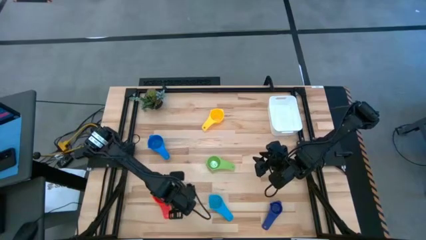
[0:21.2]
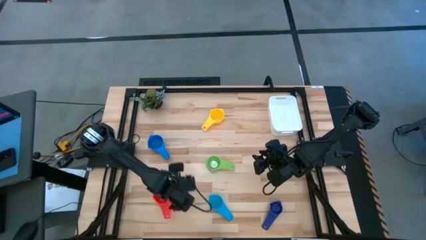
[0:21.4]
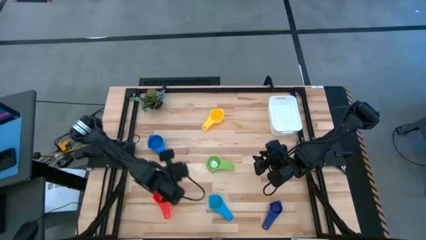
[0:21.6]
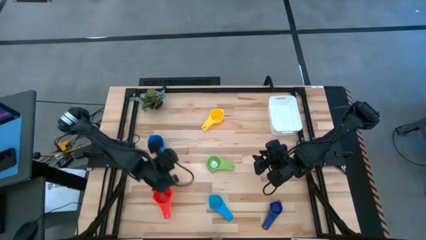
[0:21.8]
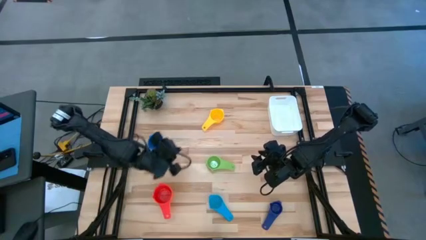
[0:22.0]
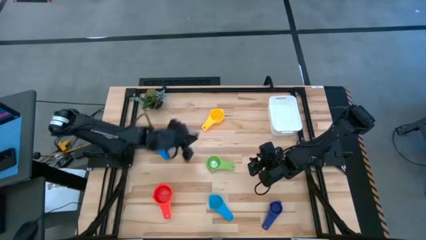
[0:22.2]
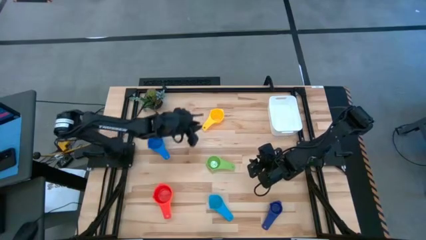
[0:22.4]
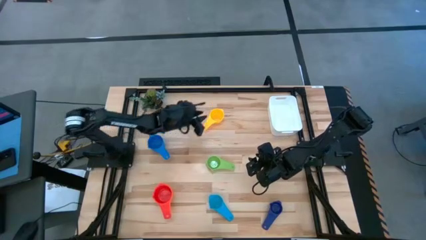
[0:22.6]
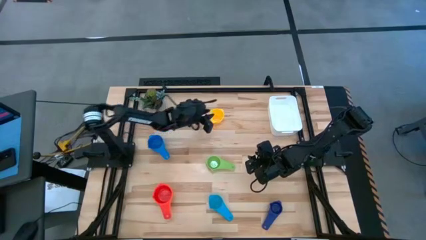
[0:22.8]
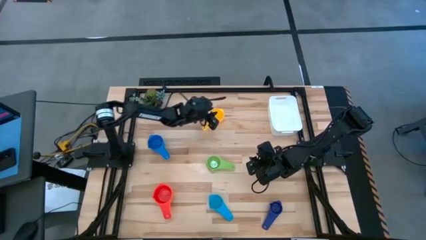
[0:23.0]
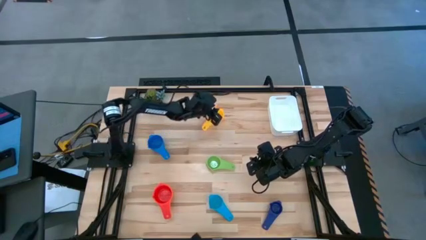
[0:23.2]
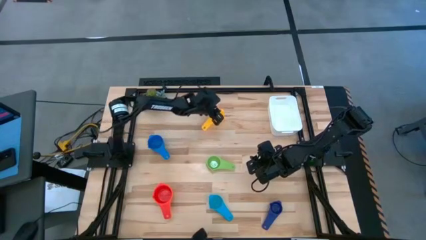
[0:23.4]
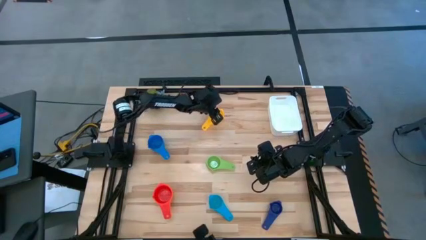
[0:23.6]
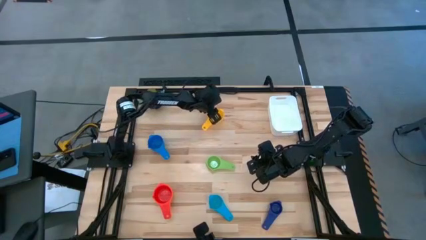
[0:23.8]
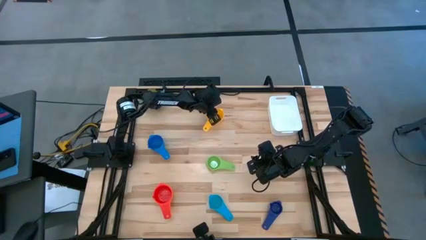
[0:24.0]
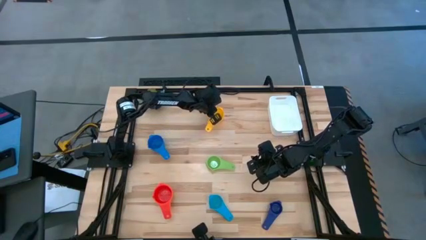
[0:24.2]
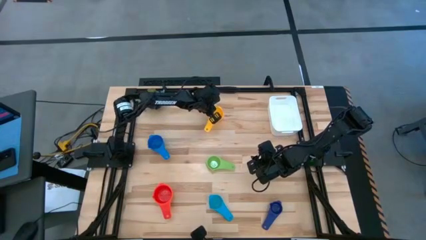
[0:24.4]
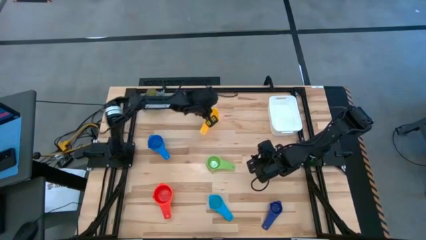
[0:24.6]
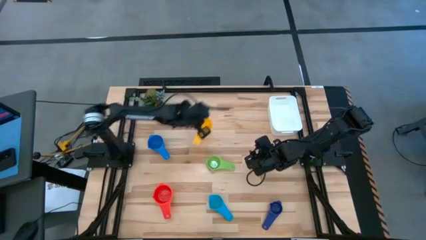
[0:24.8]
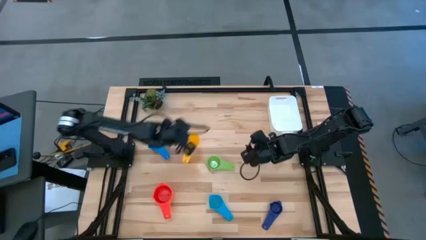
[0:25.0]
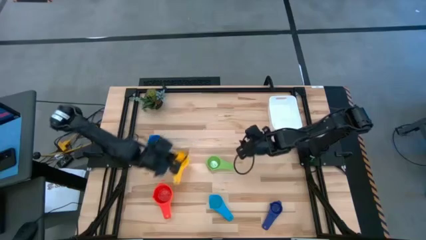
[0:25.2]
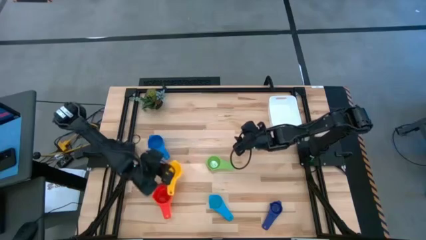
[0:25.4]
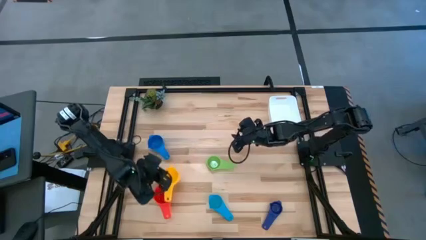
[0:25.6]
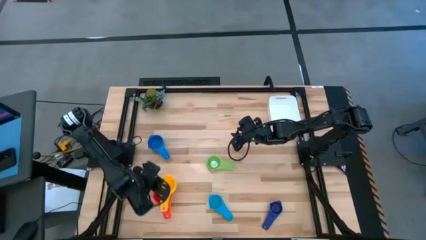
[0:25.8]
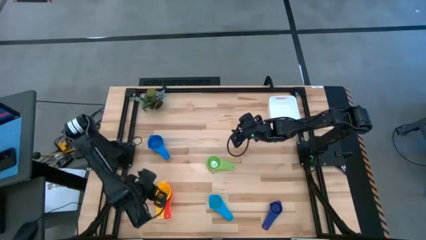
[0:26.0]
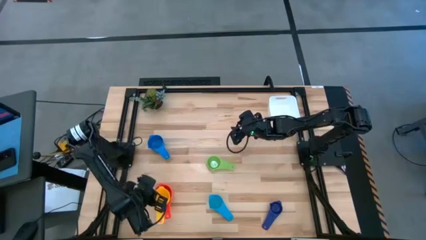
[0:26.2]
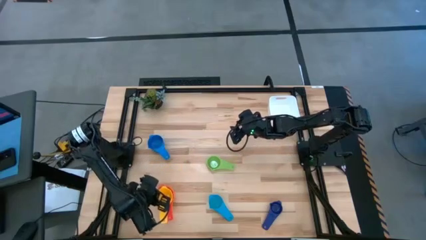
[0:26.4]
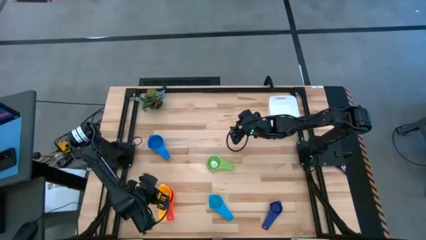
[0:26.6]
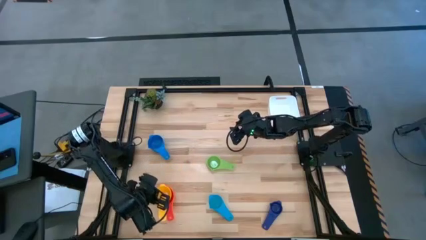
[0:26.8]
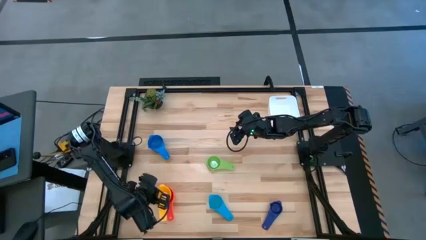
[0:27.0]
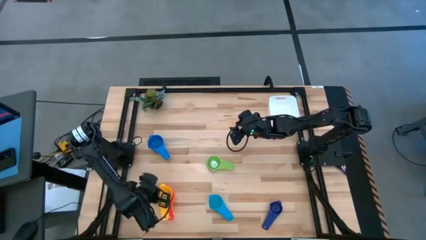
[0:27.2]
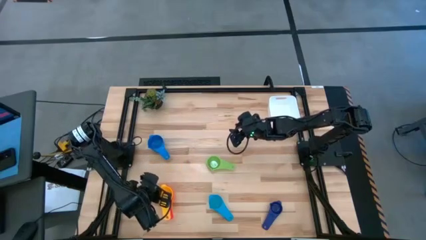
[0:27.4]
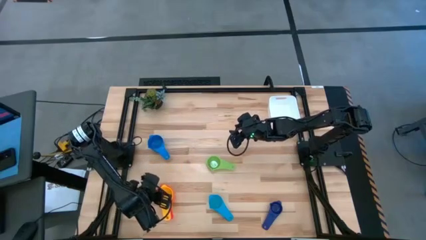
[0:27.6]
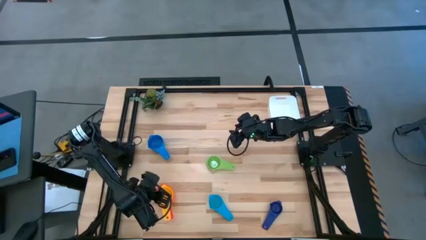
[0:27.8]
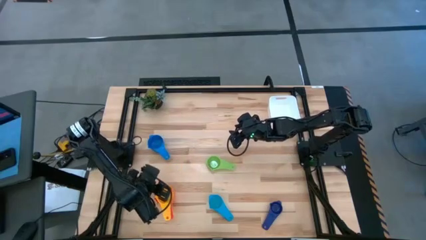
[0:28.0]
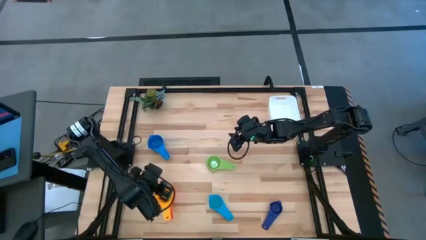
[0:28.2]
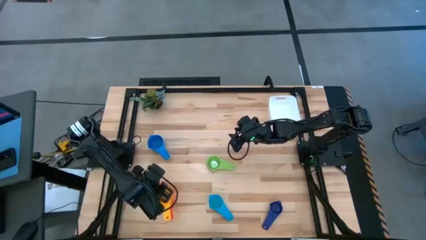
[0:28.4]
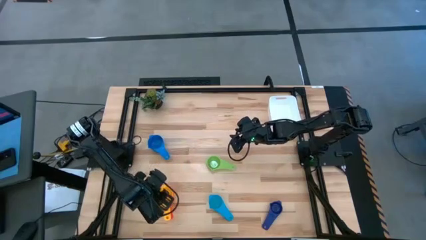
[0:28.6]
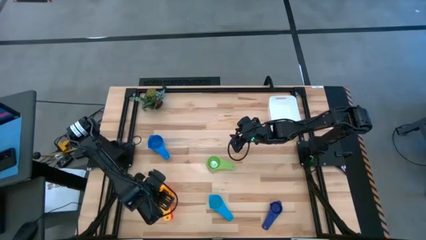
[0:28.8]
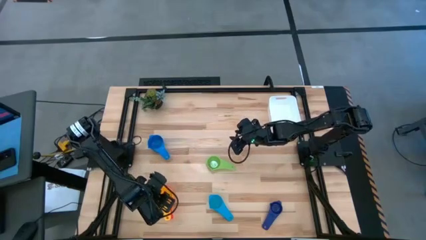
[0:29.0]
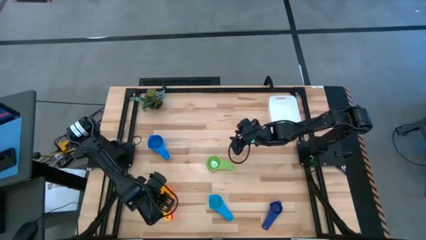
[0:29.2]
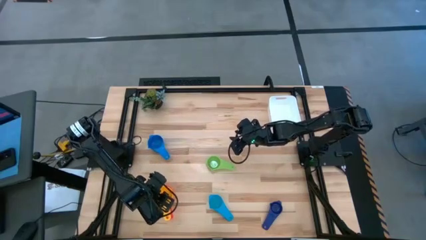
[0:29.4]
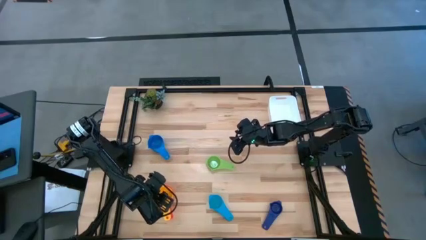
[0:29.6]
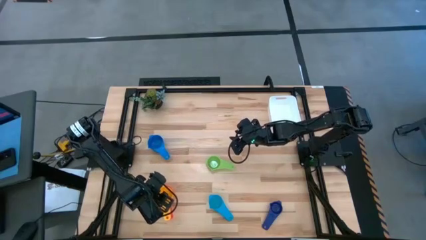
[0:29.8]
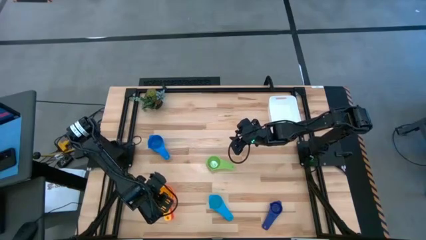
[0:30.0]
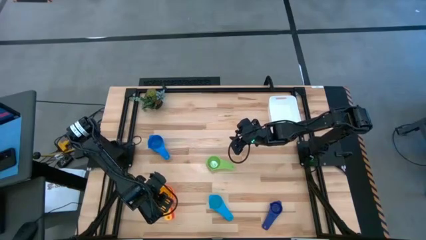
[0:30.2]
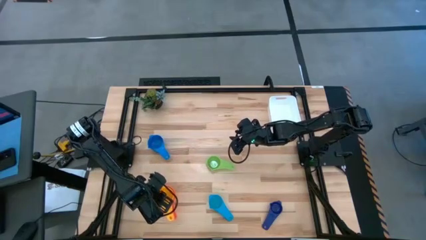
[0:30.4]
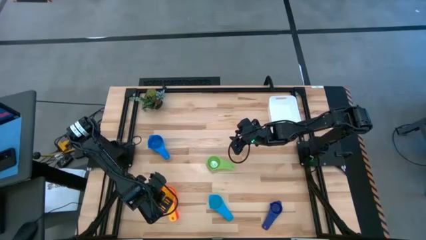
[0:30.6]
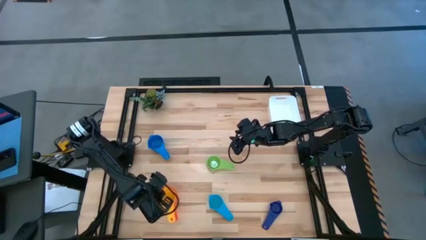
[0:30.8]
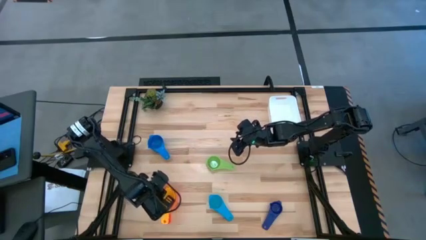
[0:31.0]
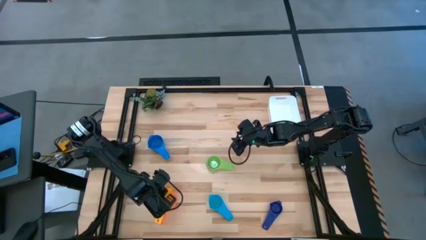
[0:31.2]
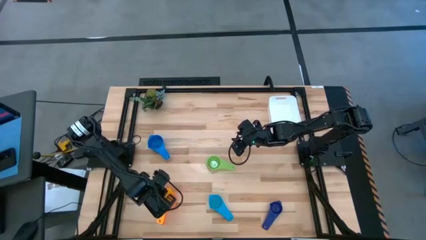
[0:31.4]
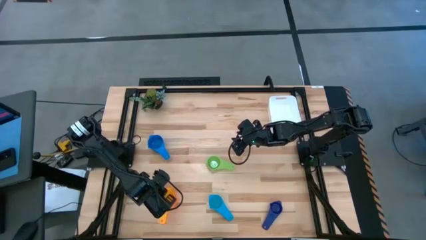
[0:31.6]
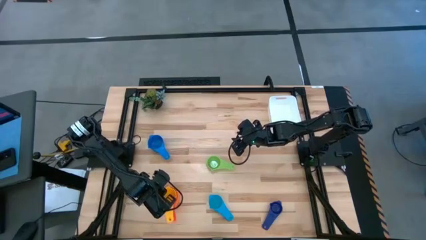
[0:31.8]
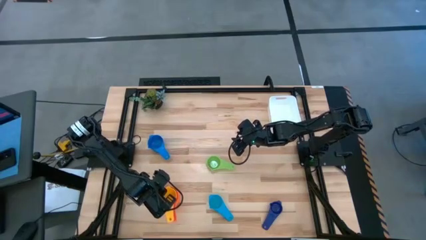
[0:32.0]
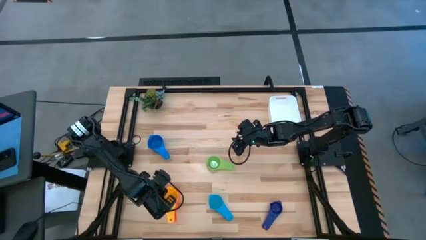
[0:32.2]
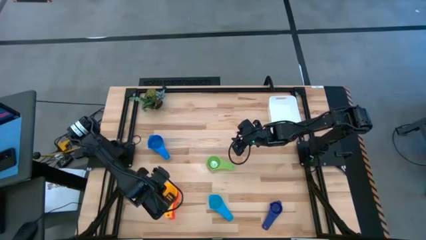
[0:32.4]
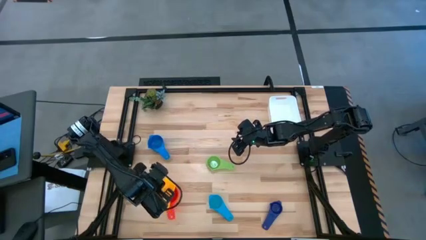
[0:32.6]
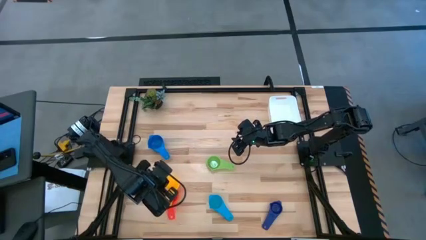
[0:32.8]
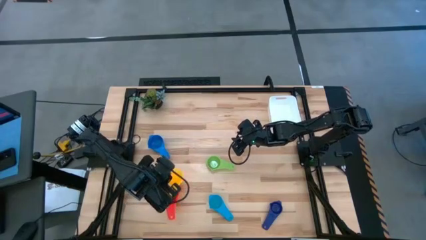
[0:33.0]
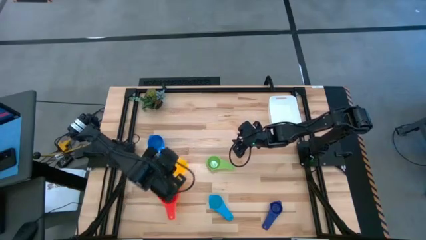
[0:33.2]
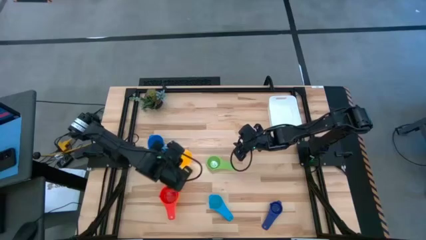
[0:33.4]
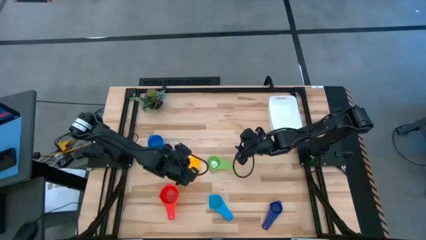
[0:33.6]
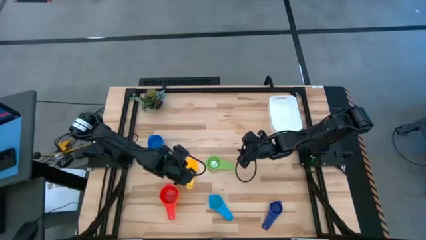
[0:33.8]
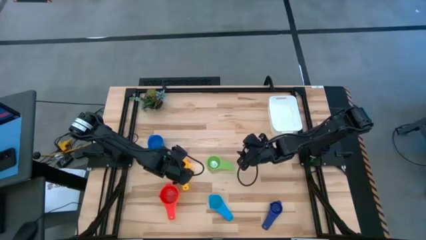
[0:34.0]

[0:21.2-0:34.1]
Task: Nest measuring cups in basket
Stack the yellow measuring cup on top of the red measuring cup

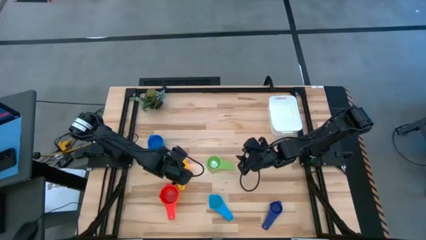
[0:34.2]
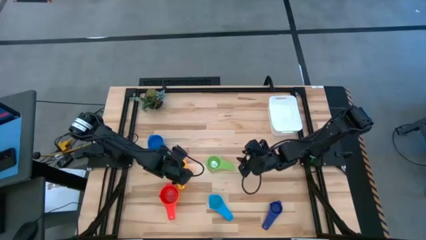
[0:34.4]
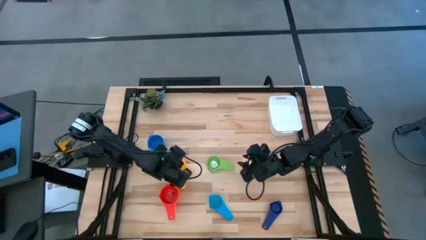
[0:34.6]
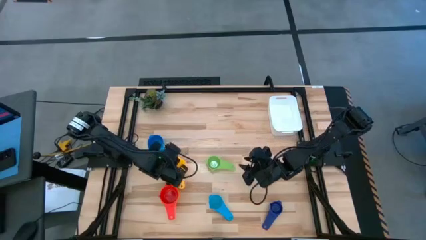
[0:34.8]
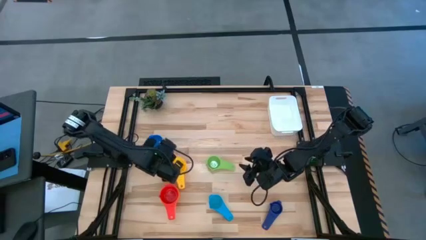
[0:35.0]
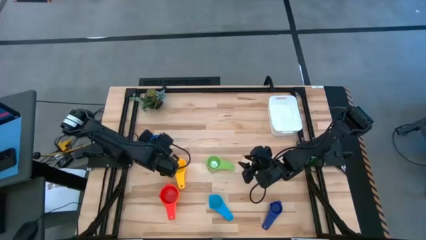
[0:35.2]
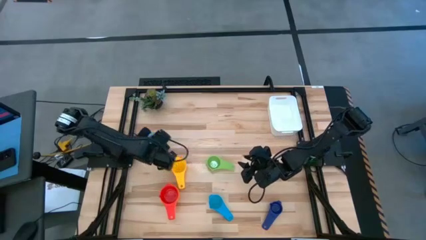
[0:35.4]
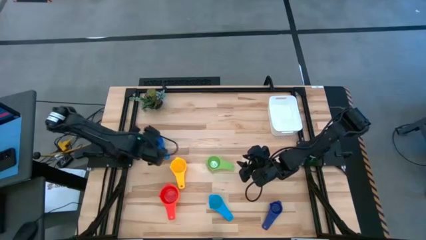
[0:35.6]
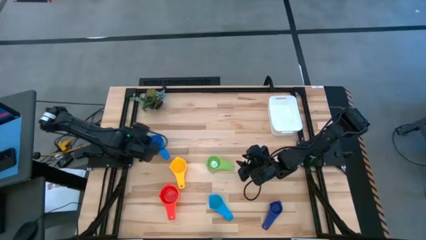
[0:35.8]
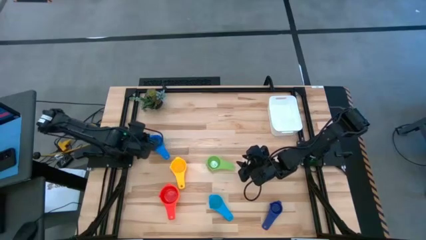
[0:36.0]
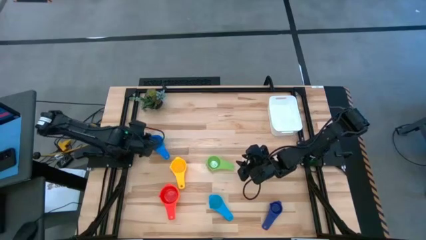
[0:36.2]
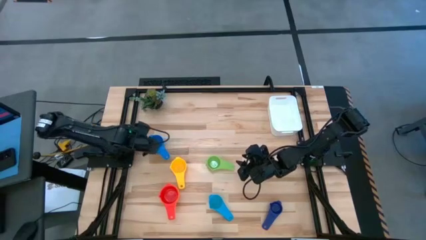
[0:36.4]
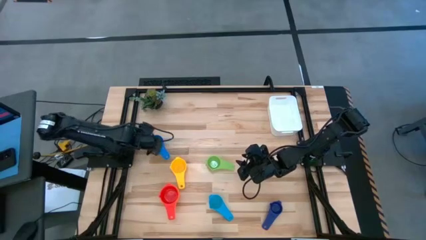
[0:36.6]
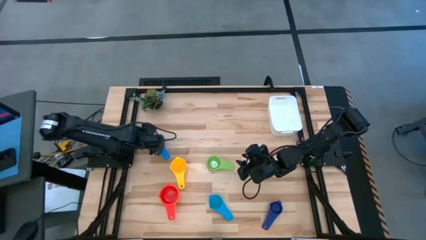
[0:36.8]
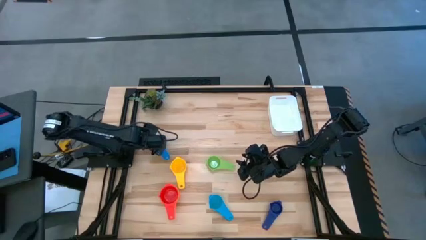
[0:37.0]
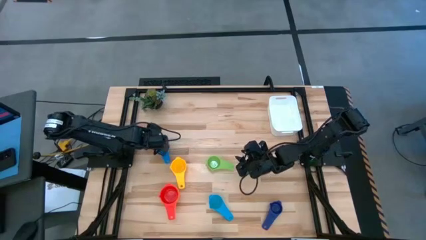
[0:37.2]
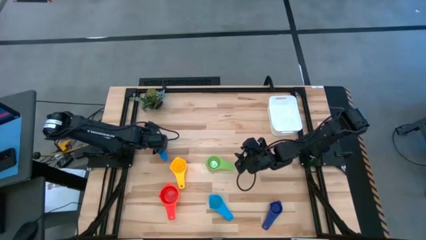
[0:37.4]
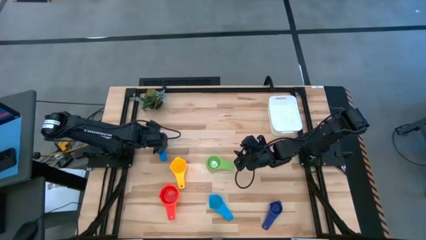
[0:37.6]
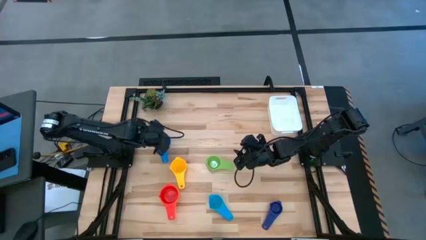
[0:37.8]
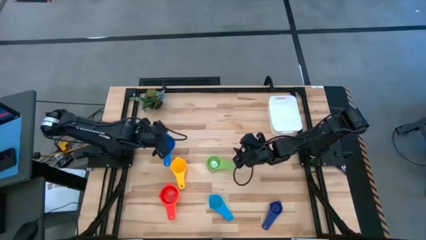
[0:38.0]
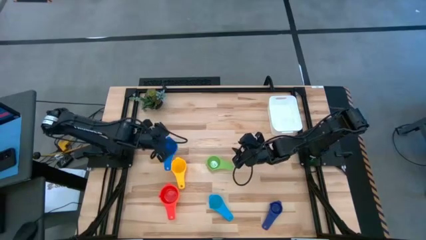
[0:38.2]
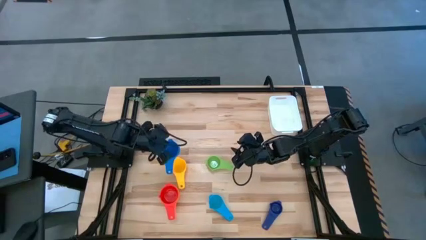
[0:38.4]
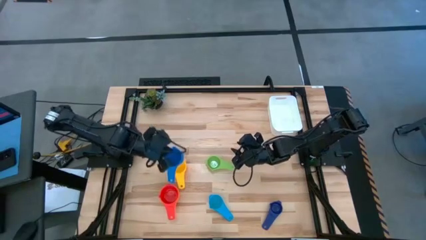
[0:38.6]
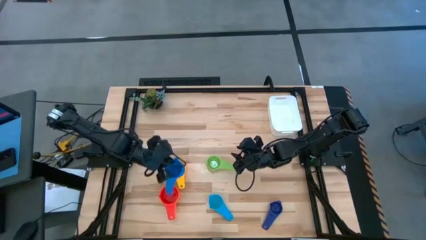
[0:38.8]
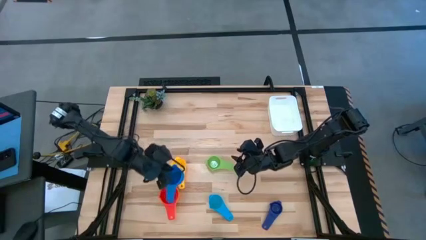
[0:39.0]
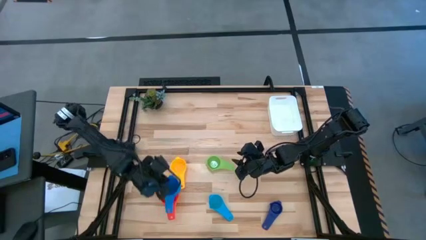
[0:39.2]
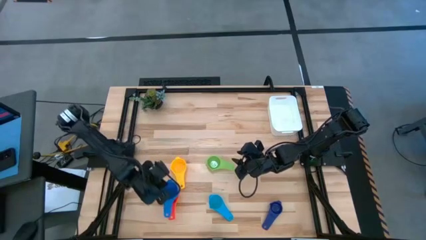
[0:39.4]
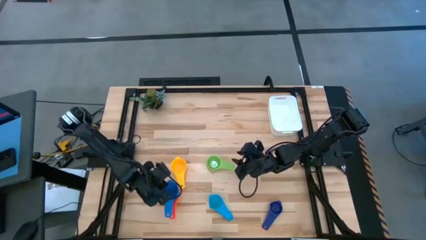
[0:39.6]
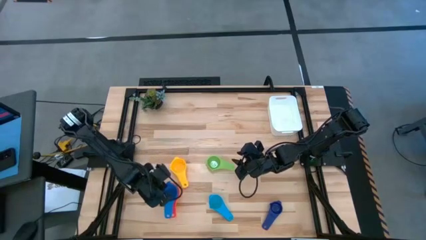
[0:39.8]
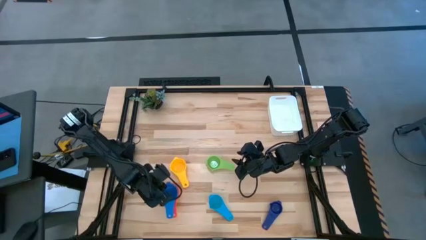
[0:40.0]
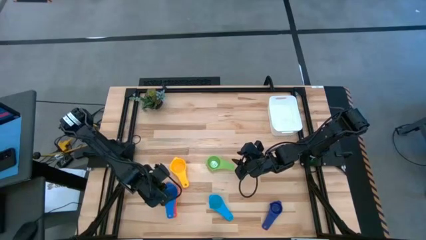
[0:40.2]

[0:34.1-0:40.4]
Stack the blue measuring cup on top of the red measuring cup
